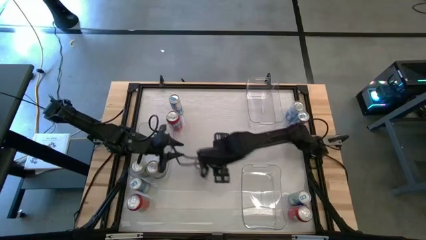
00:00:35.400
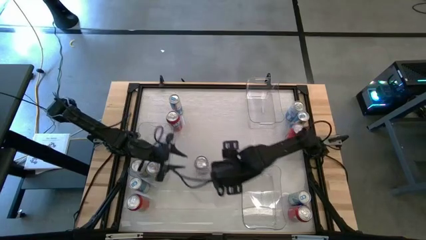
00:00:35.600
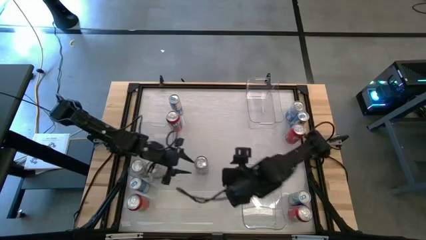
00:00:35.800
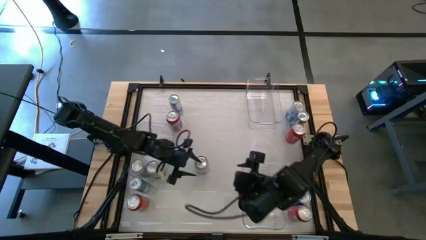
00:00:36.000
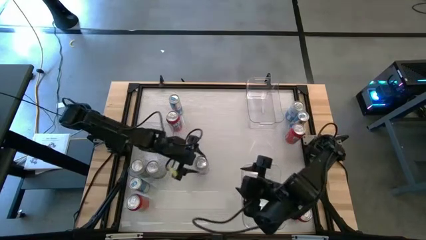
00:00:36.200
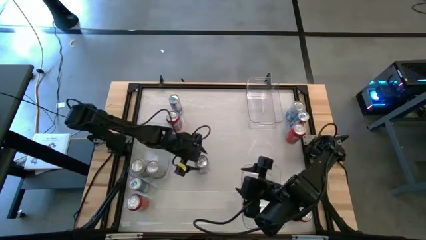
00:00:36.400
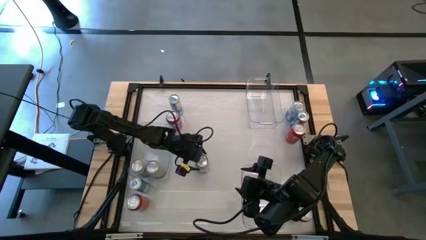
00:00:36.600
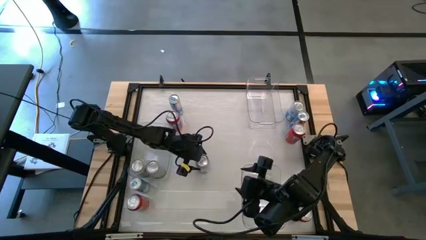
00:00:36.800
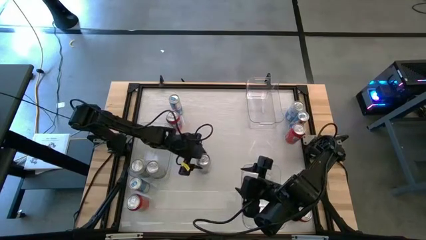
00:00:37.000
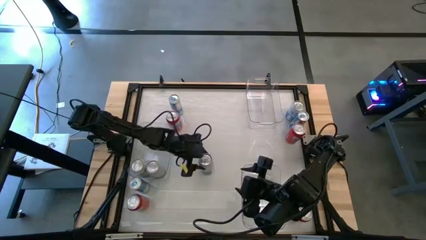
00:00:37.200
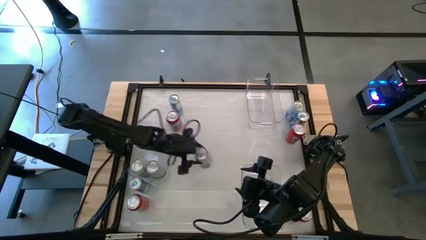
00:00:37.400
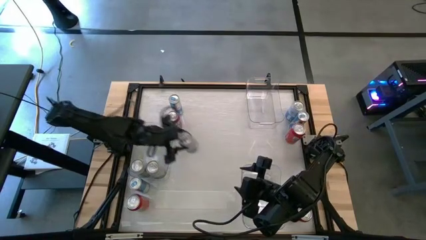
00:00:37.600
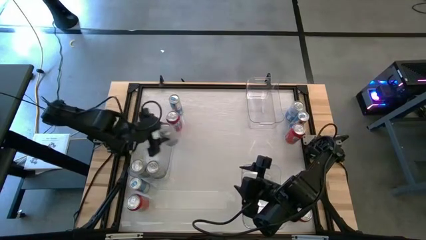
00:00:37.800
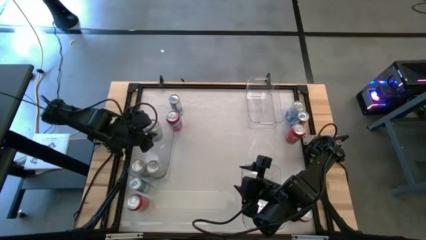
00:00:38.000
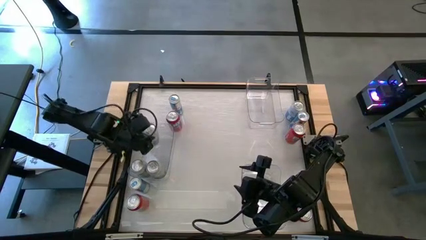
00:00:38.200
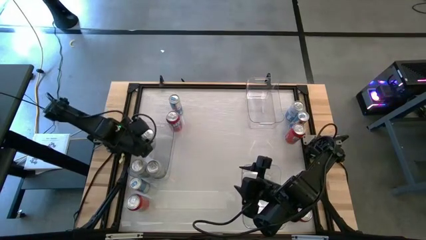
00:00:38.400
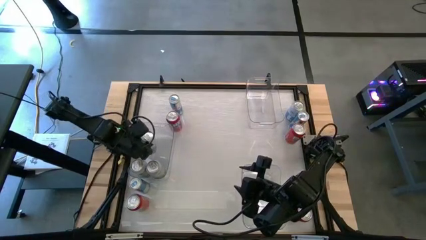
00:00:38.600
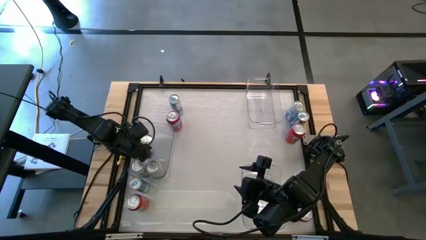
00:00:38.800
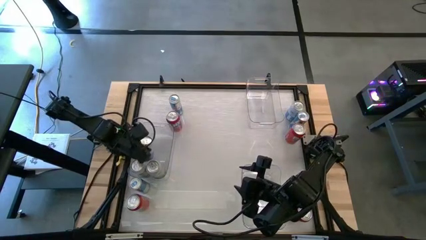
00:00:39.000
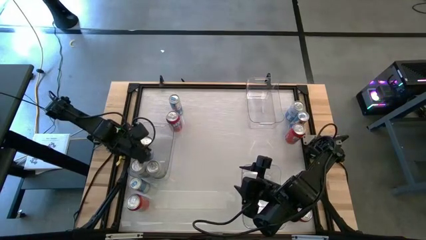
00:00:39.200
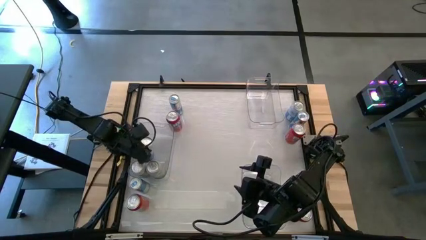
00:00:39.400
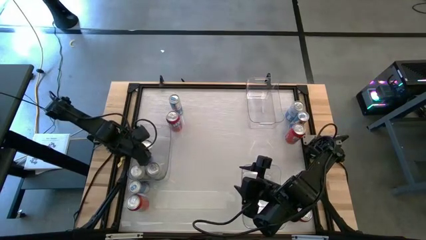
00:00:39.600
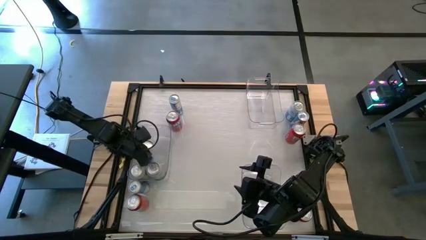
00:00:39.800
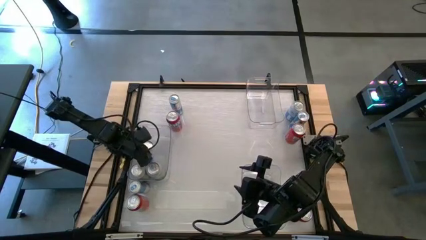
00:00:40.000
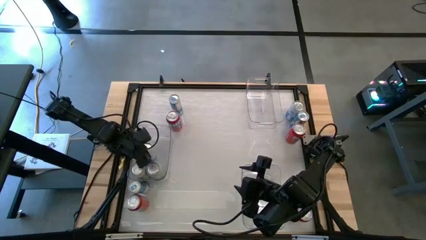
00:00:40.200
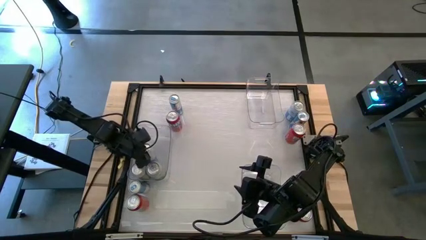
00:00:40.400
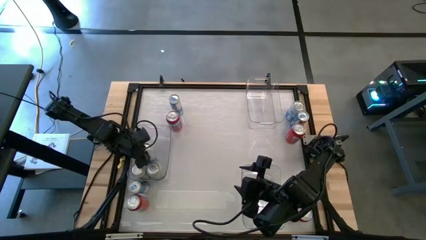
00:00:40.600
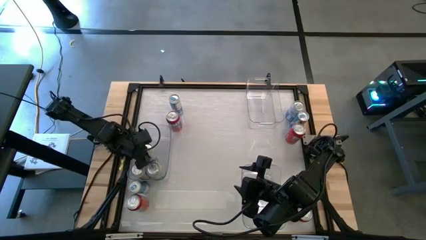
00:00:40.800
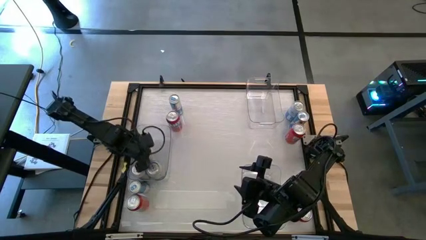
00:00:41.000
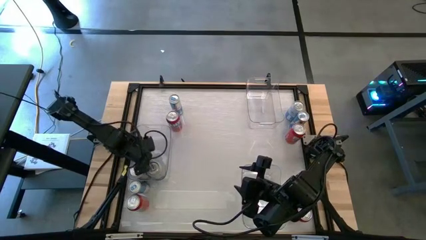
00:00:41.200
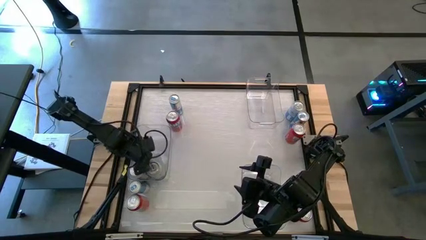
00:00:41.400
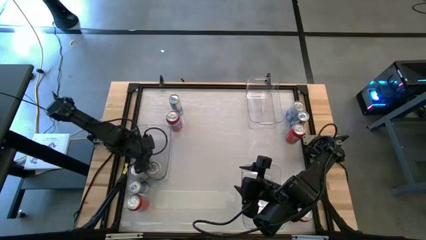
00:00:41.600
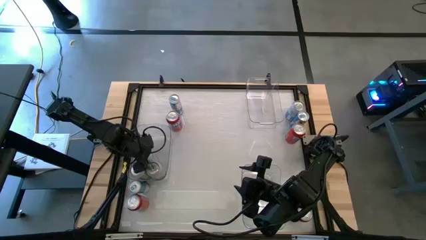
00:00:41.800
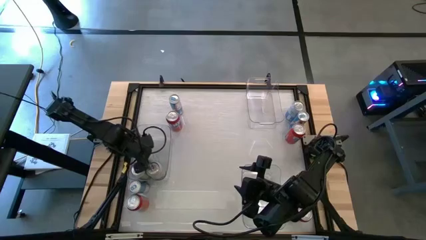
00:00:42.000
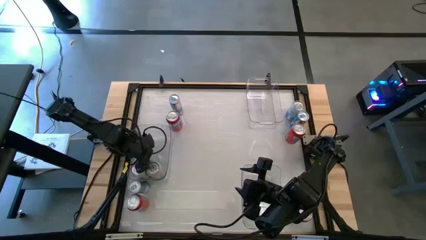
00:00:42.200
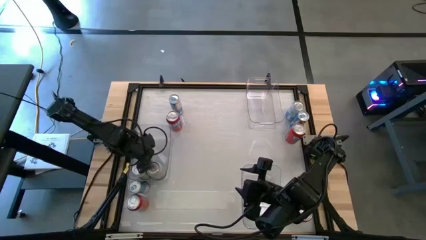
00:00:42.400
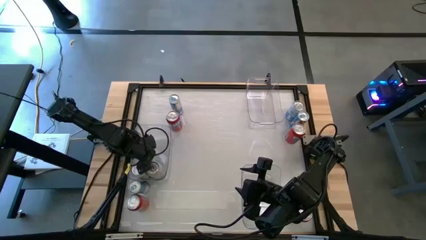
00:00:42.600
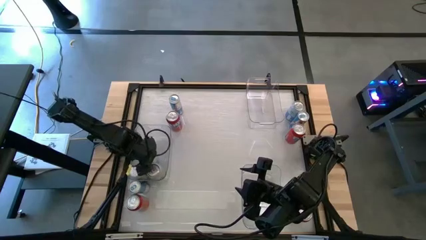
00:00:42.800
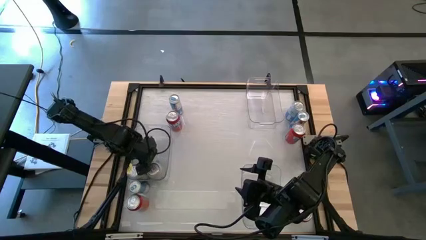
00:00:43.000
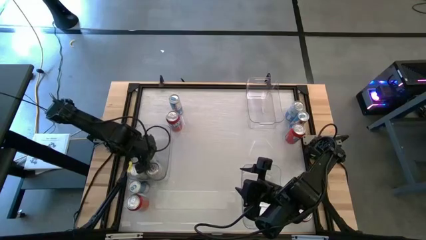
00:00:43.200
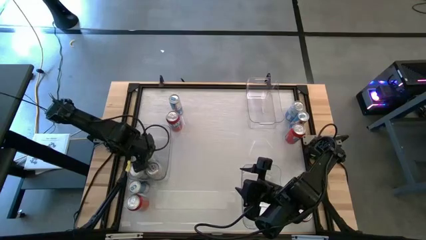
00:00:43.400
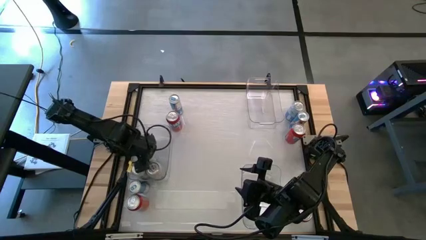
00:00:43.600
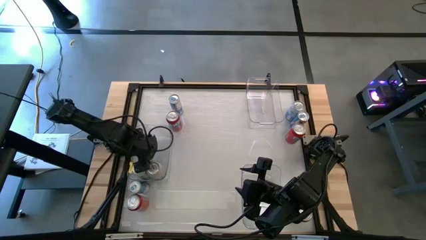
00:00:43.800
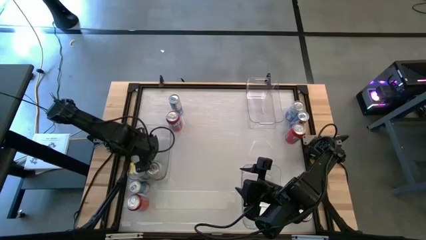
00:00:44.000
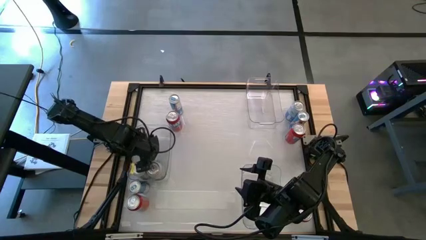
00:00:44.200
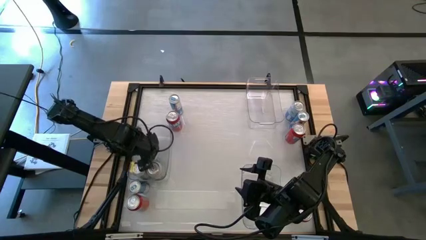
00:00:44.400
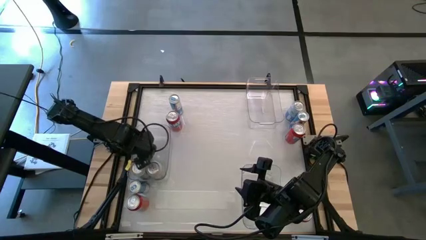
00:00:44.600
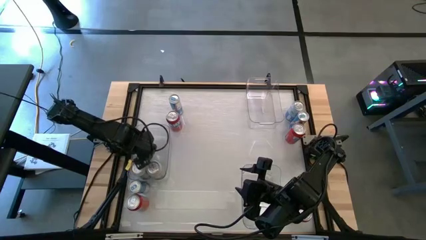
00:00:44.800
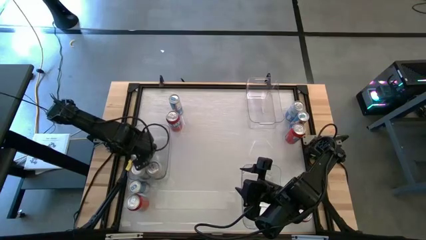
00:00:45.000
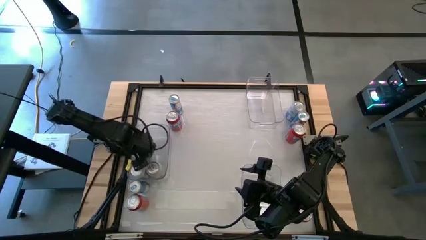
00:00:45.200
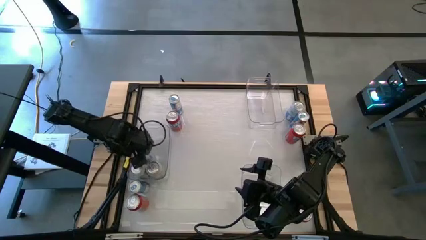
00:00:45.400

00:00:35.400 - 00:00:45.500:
Task: Sort soda cans
Put the center blue and white soda can into the middle left transparent bin

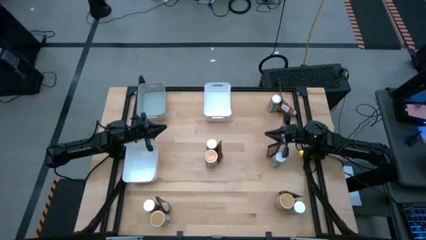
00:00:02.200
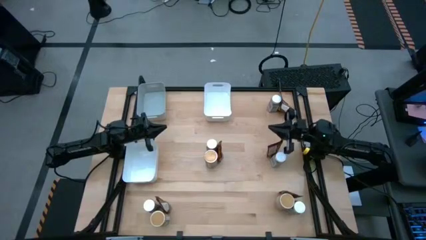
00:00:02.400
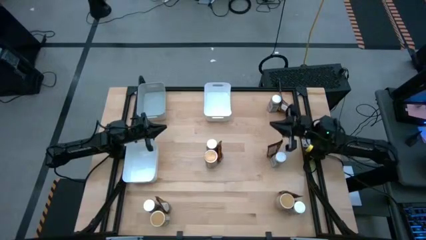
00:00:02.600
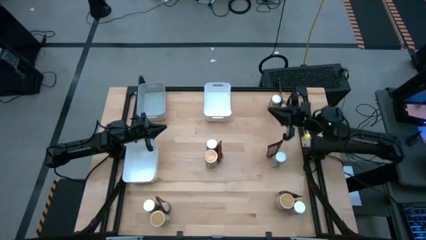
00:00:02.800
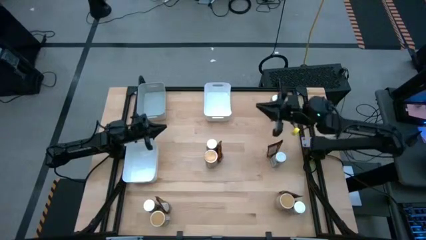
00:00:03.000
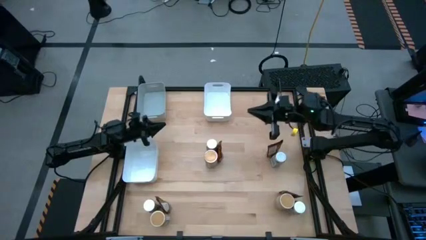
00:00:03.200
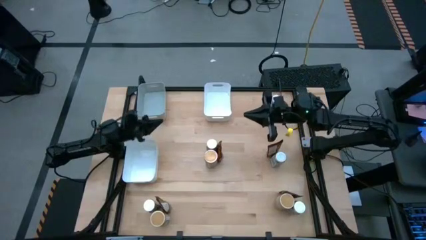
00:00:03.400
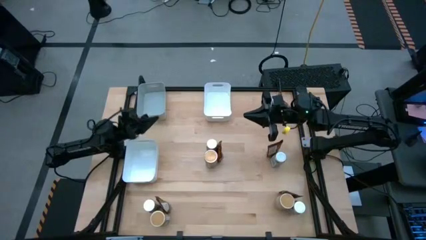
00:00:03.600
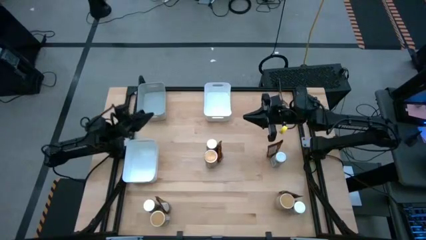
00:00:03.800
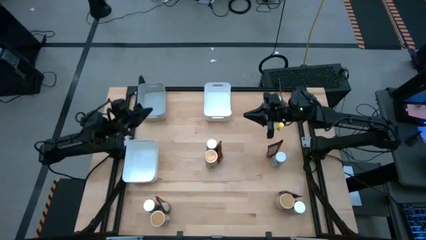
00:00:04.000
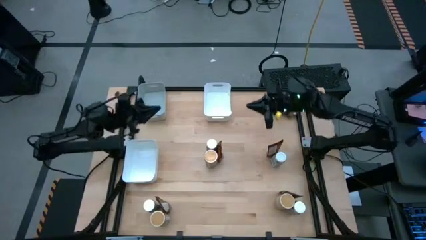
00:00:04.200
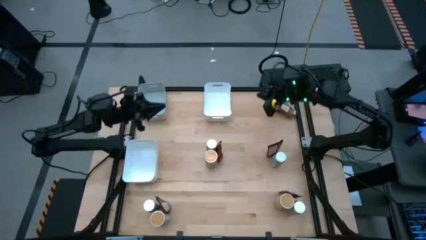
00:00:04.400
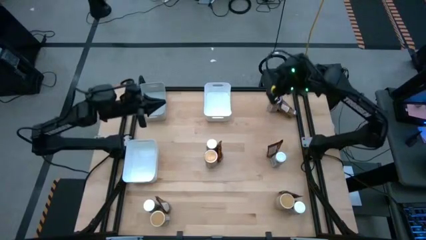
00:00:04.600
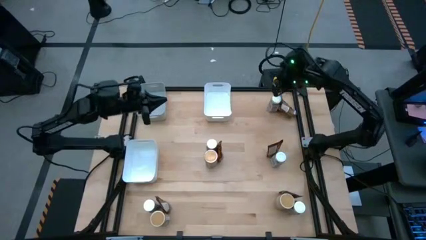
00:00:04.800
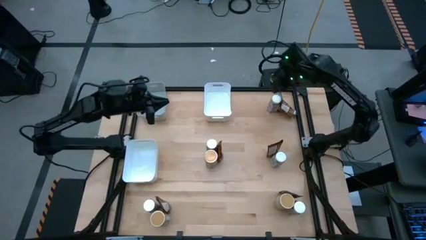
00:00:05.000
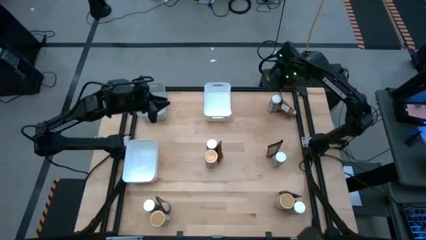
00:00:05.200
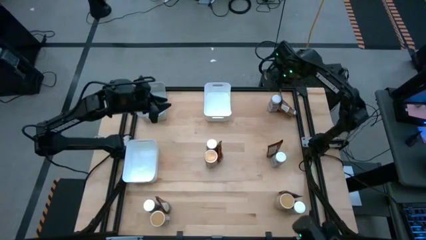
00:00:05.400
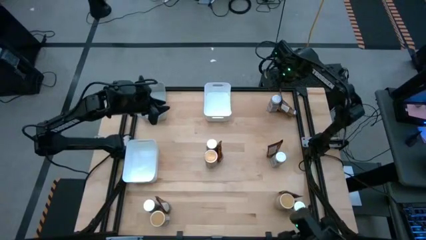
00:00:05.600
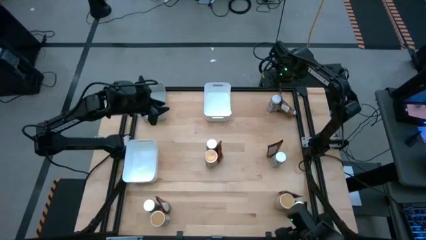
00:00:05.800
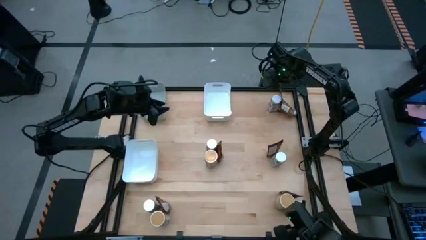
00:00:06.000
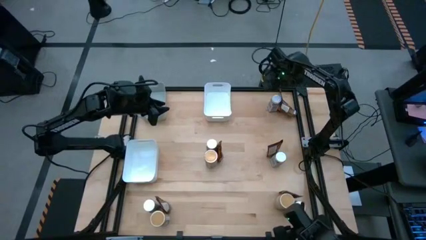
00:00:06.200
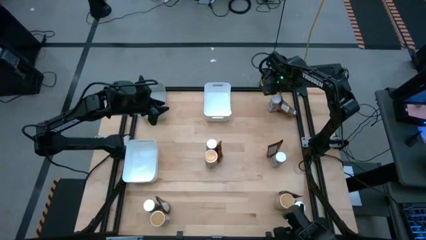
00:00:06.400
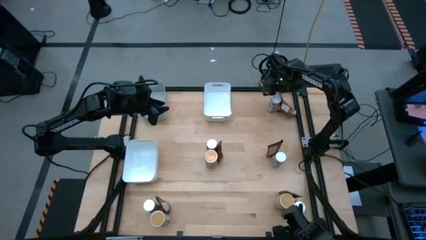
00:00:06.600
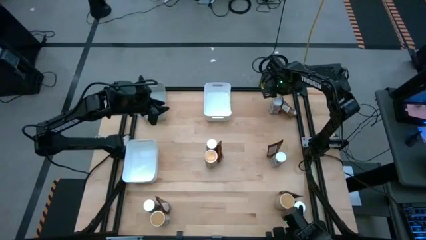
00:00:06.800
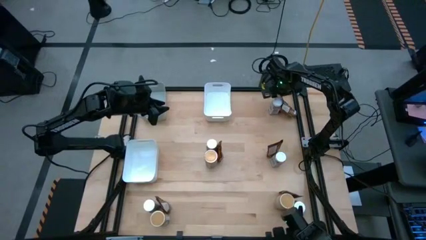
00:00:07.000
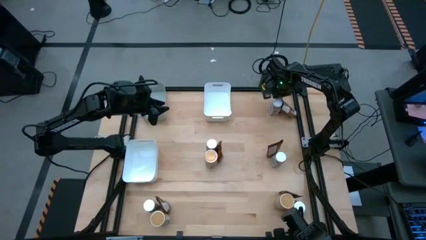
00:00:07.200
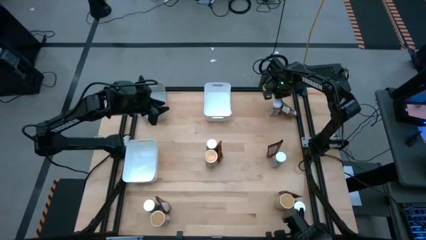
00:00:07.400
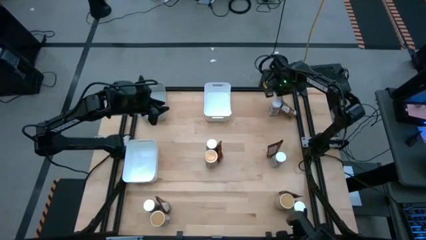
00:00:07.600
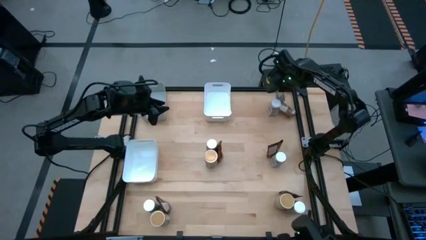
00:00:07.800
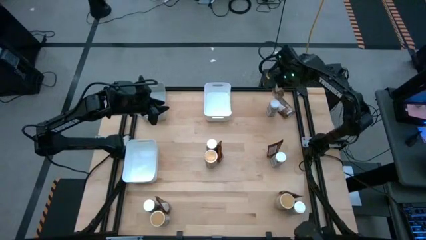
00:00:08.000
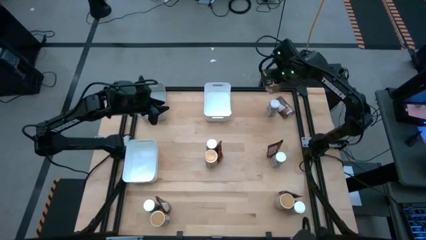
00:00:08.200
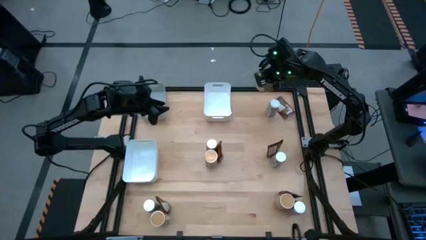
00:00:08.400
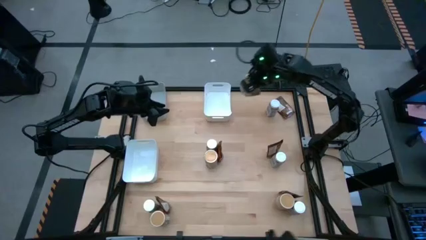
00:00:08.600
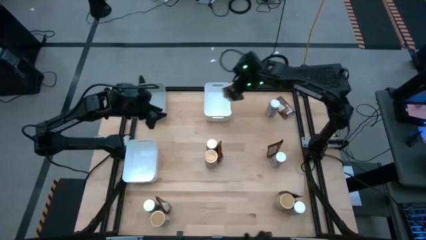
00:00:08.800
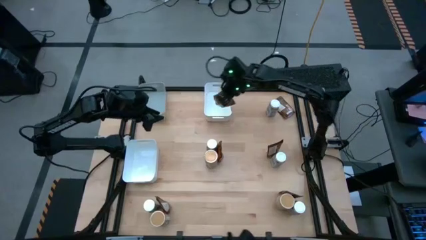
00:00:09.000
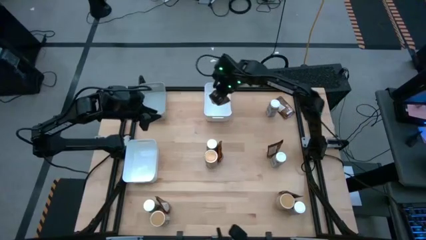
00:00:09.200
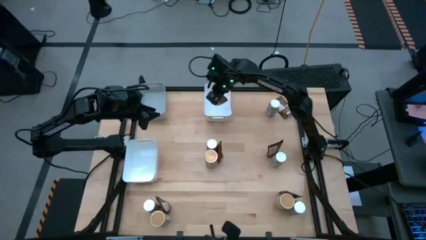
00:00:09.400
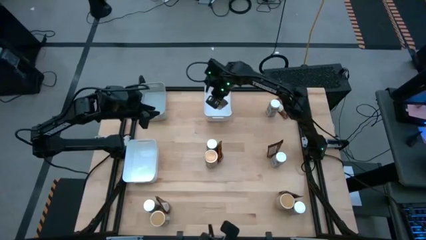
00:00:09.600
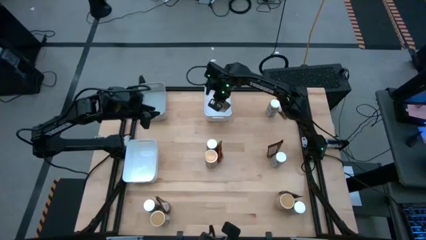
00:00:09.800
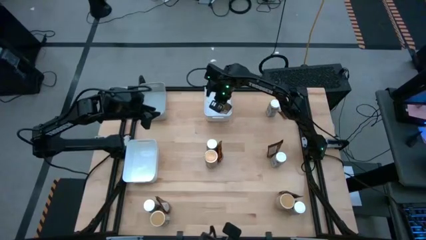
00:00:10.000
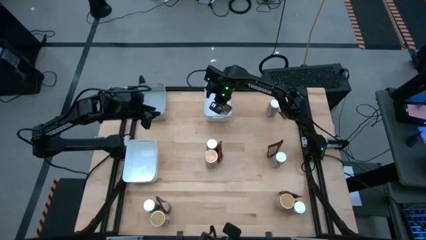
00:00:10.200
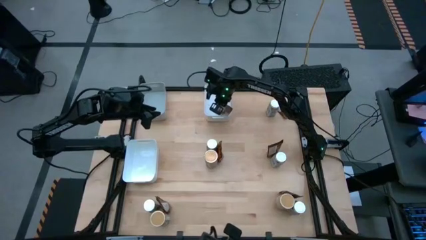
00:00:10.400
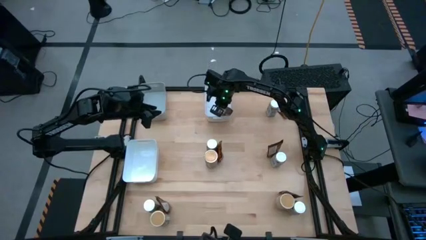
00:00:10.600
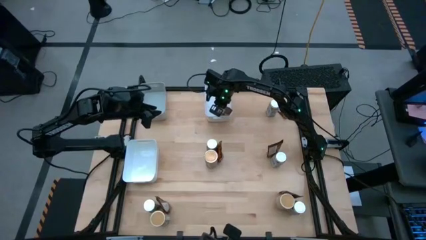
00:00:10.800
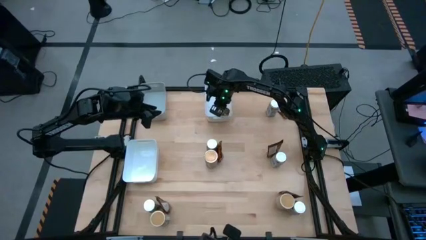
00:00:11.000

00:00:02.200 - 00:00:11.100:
Task: Sort spices by type
Put the brown seasoning pack into the top white bin
